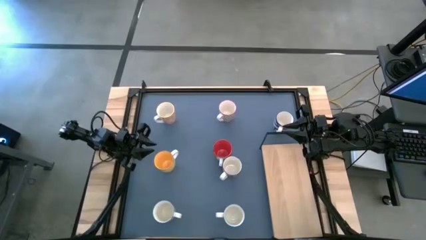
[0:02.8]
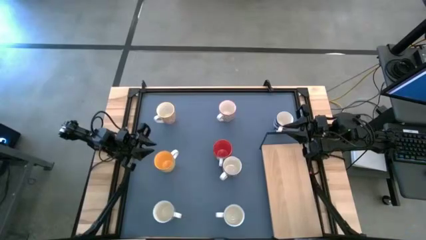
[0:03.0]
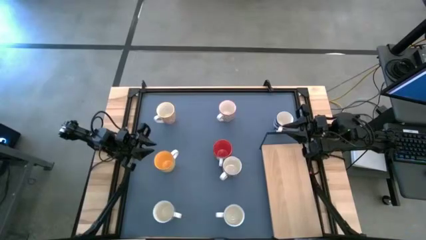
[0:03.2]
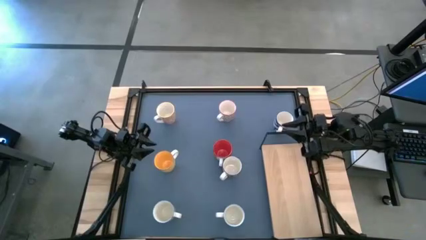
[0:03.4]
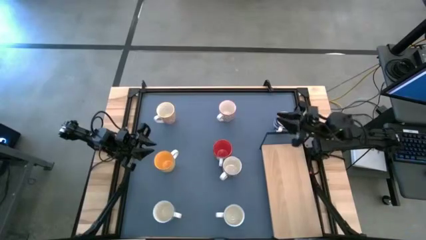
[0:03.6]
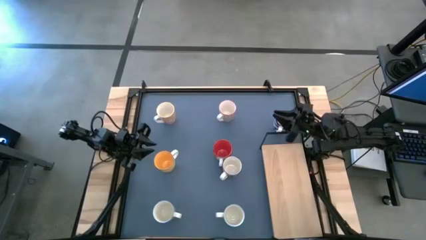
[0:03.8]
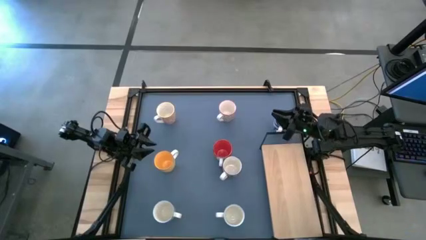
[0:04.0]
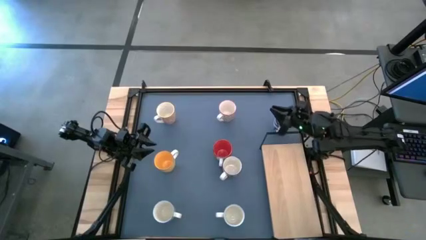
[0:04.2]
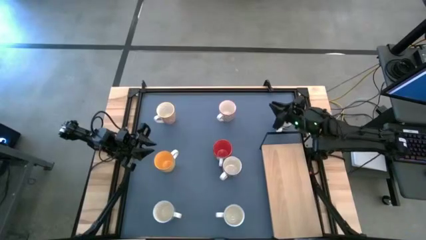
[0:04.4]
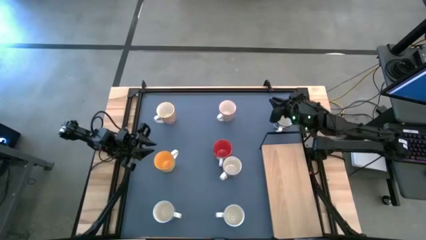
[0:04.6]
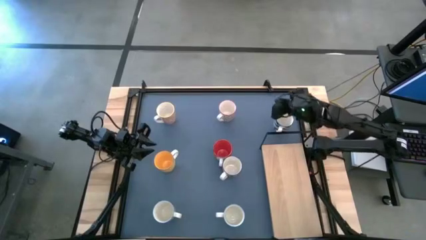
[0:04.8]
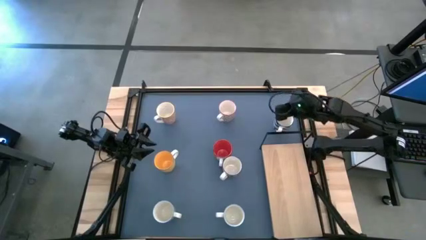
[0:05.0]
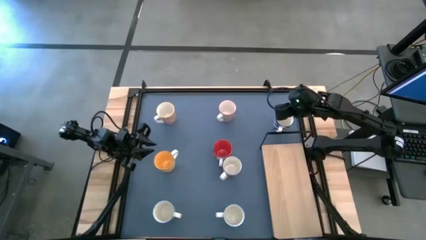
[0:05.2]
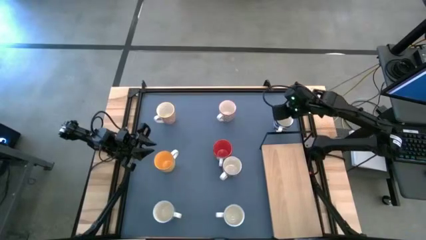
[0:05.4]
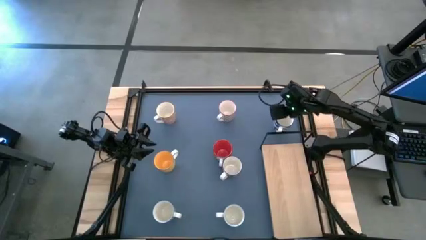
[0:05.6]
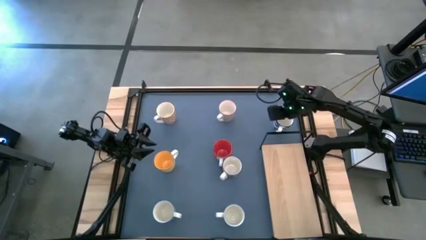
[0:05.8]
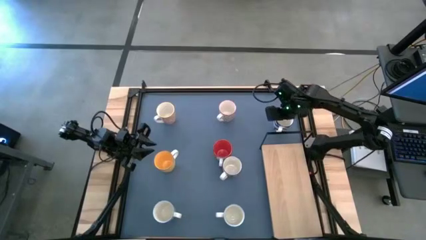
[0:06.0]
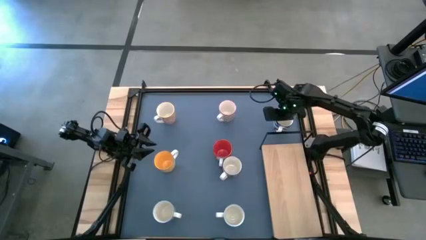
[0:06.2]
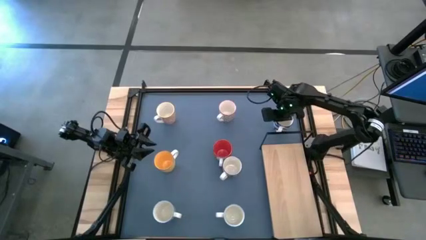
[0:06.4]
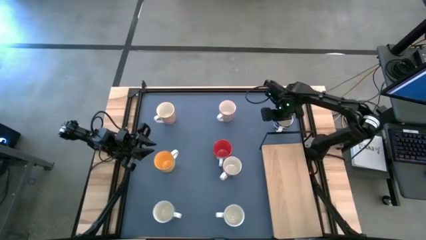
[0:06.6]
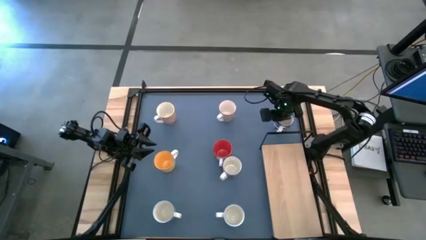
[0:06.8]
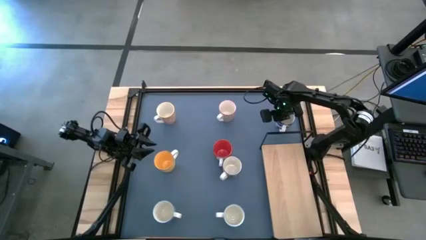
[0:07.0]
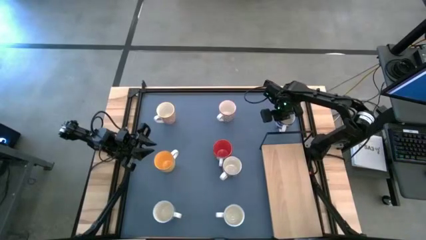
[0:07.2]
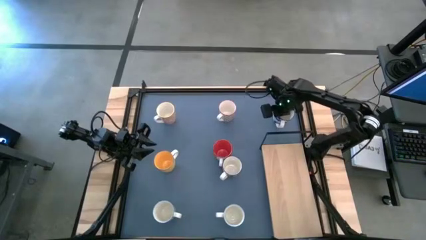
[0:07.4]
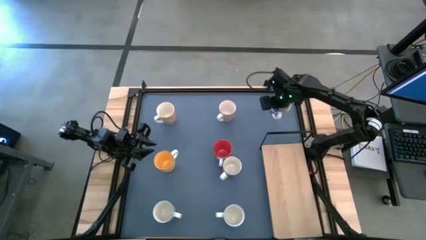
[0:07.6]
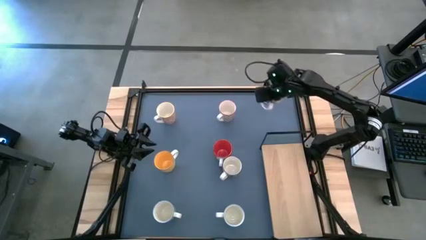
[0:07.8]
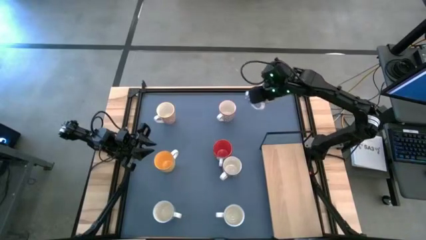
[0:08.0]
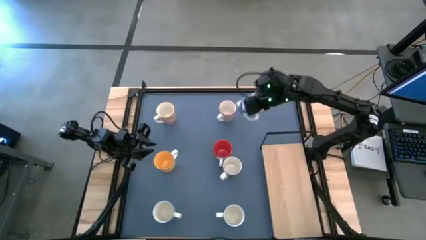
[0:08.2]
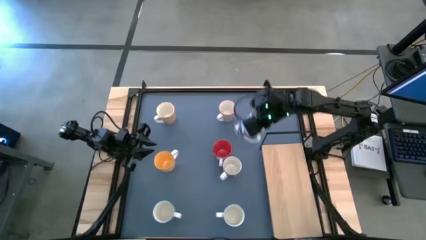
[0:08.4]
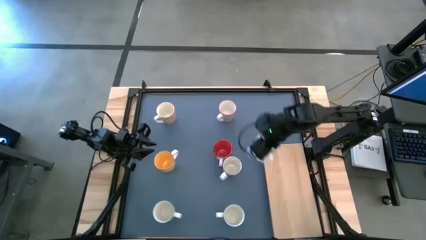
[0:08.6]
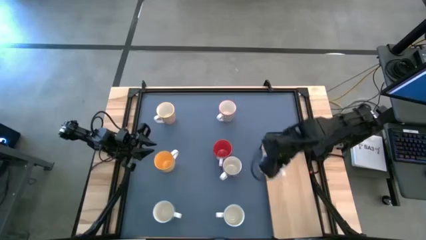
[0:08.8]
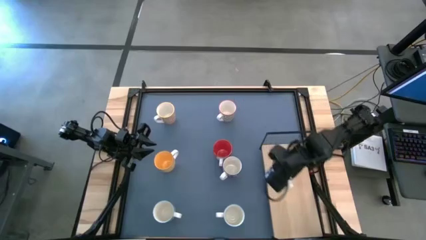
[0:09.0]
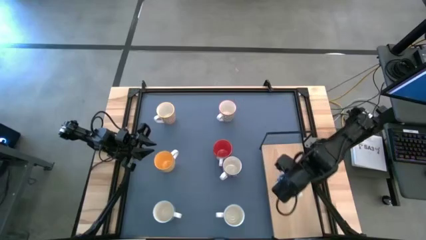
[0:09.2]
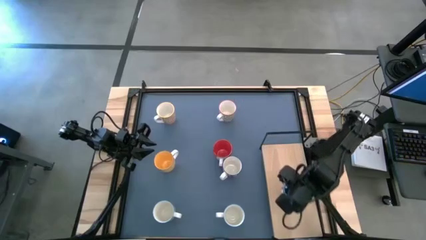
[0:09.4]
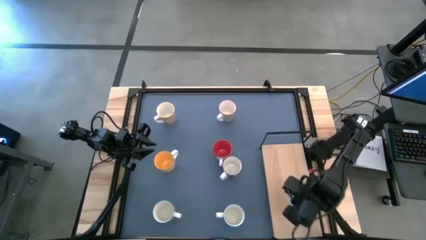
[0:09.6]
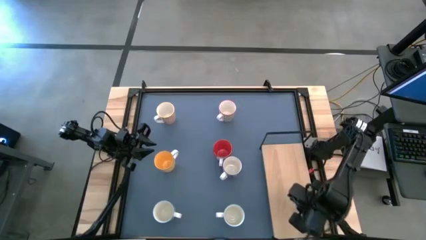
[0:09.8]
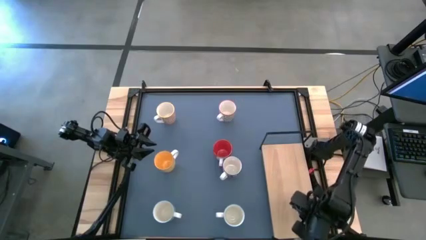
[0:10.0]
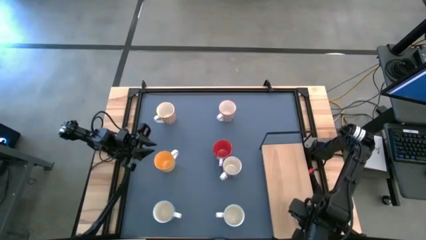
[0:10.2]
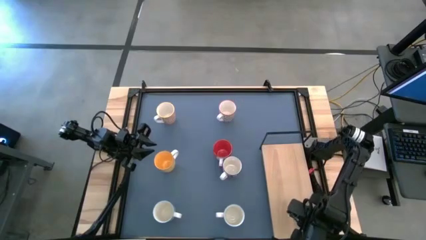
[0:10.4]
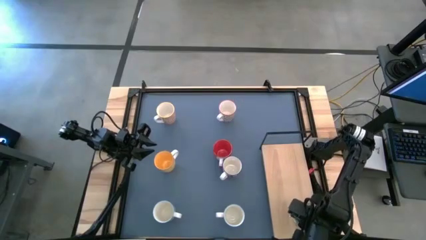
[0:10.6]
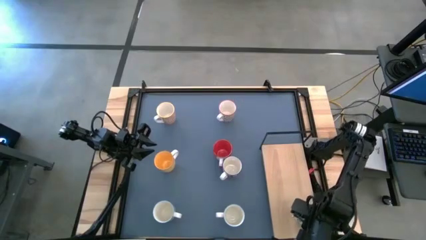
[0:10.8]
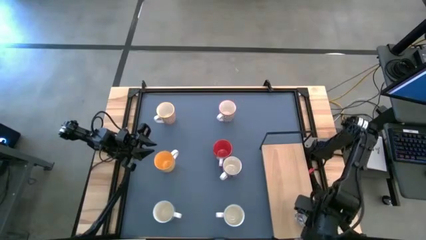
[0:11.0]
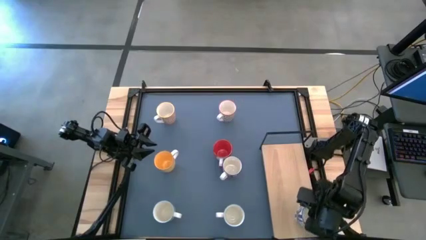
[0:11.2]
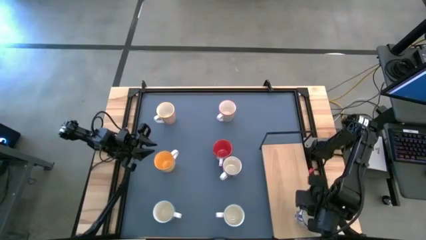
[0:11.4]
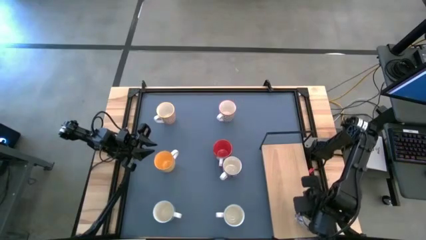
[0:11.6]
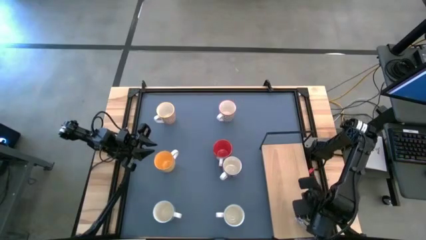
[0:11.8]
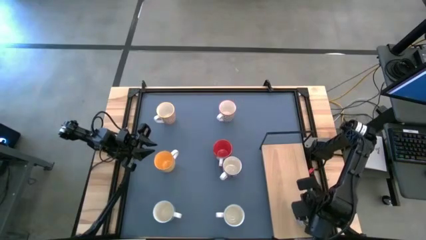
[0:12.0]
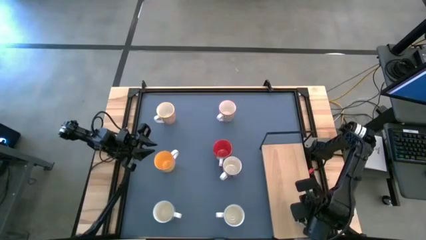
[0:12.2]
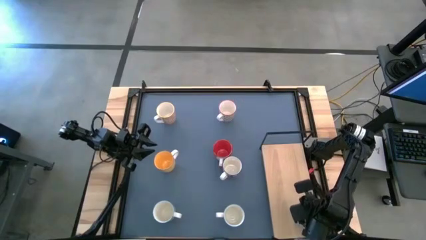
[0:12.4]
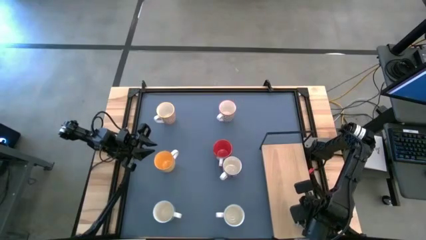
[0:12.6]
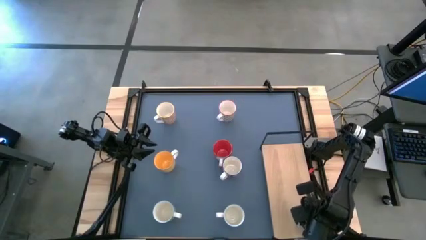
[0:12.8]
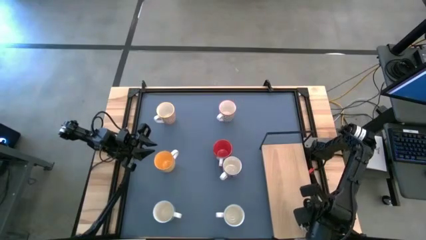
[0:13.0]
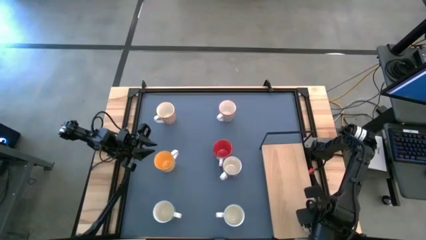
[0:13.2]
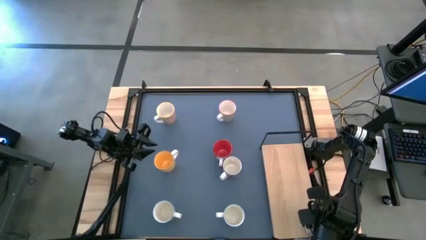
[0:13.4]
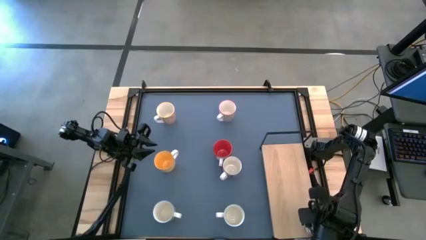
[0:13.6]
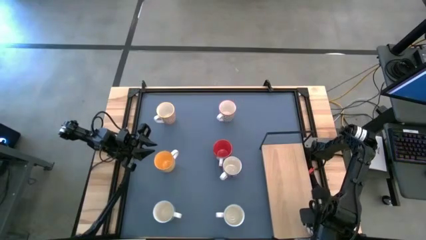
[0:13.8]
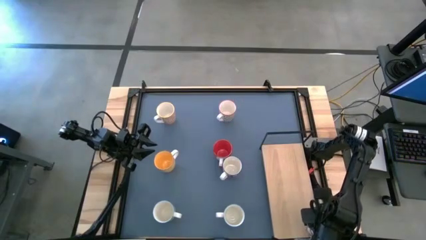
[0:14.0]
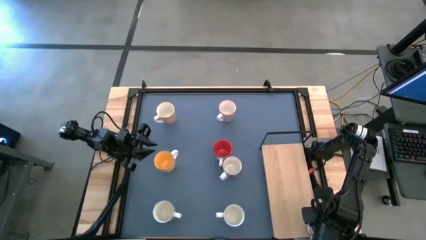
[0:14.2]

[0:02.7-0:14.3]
Task: Place coffee mugs
Put the right blue pattern mug on the shelf

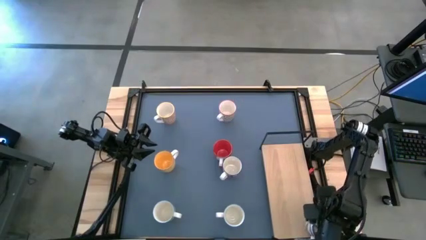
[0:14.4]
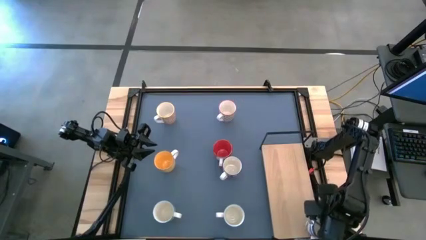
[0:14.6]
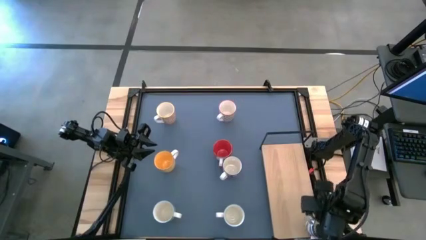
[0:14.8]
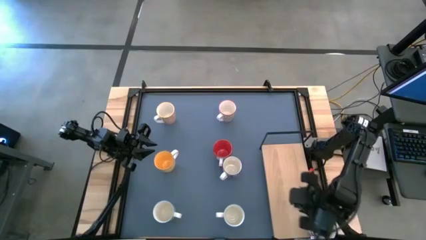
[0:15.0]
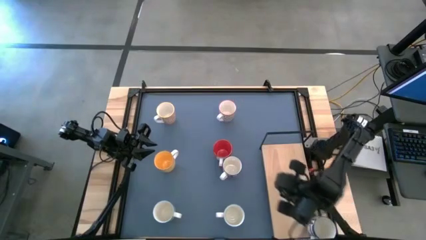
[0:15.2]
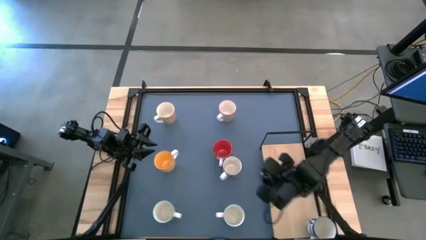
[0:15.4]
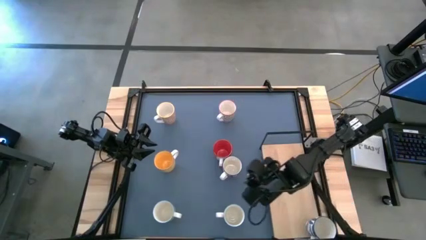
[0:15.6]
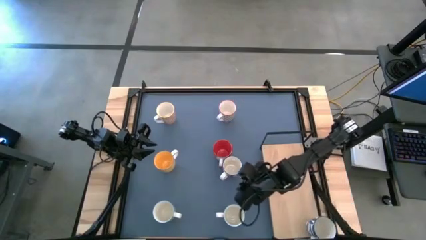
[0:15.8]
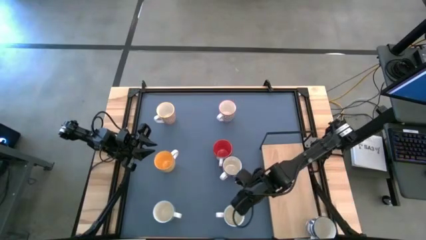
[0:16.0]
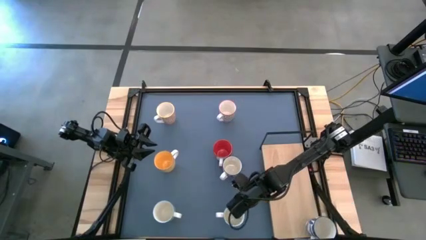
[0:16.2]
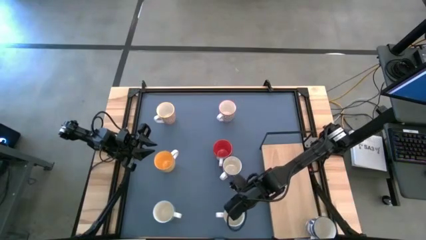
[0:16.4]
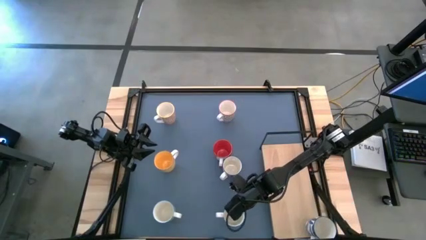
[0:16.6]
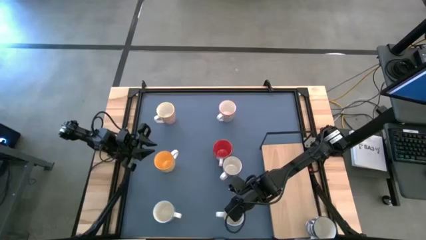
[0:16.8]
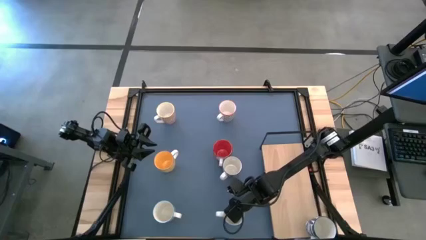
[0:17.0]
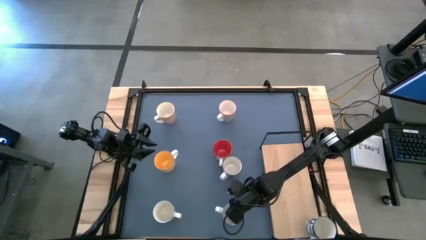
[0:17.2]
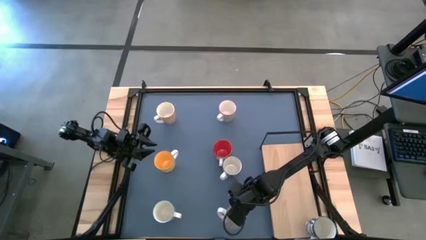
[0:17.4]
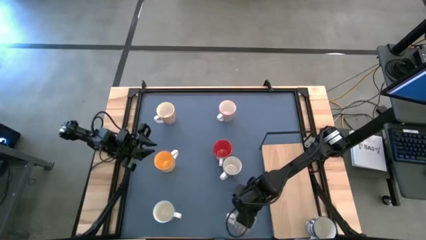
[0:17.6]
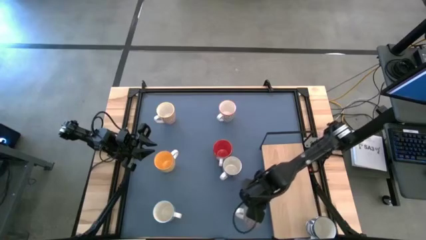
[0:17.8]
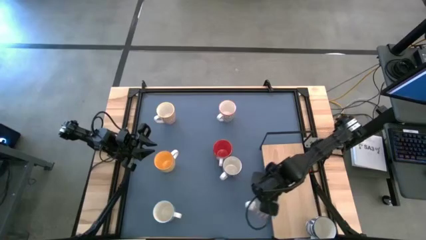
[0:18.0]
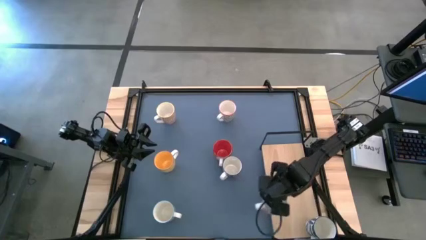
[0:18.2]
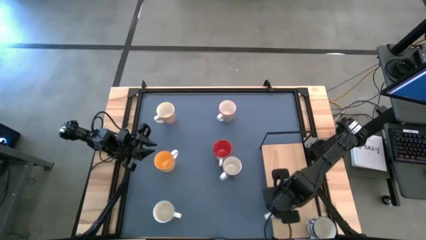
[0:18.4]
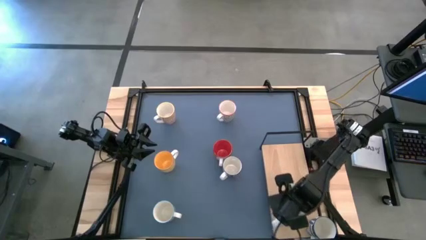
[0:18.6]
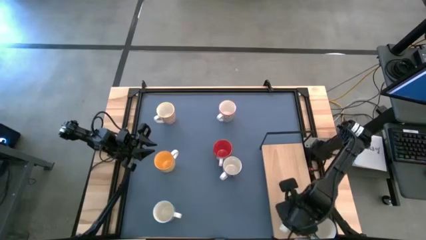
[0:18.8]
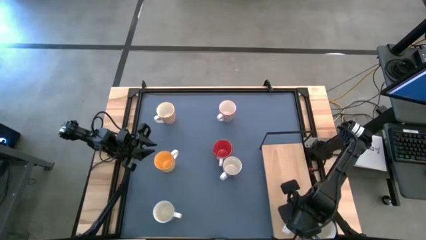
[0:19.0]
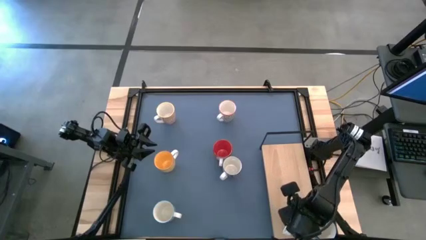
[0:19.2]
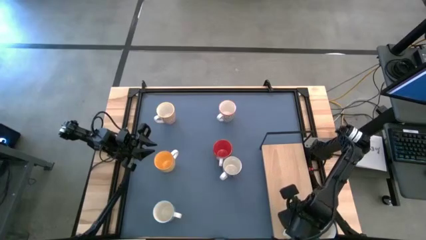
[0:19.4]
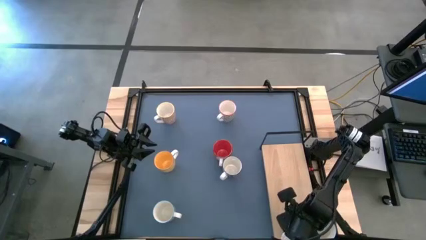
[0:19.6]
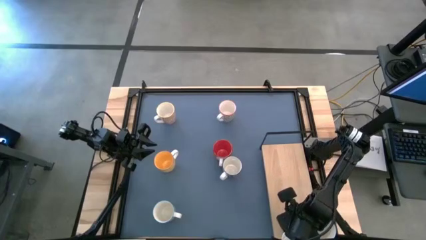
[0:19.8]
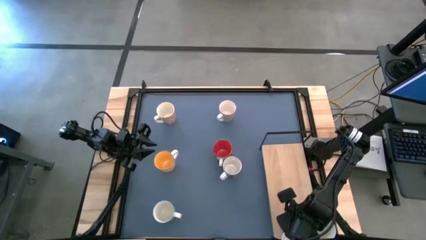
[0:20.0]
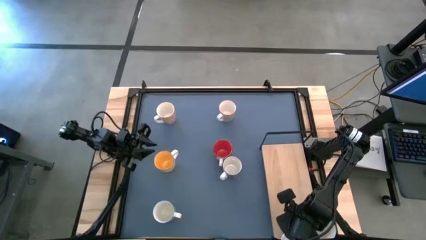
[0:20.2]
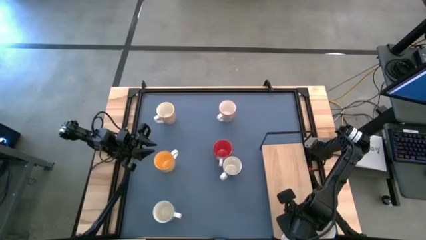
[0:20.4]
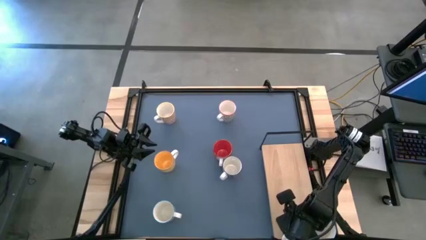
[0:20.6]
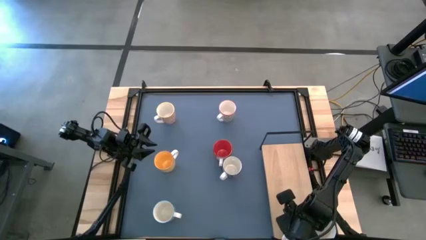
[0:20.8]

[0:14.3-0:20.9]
Put the red pattern mug on the shelf
